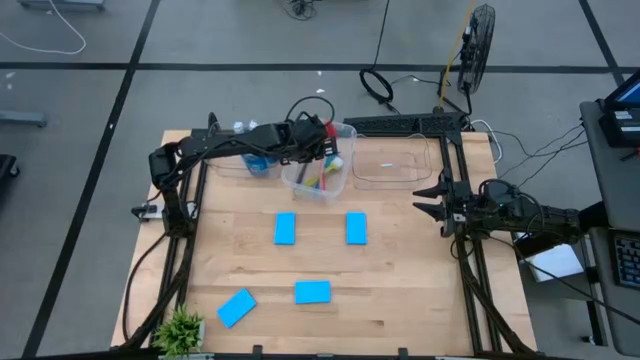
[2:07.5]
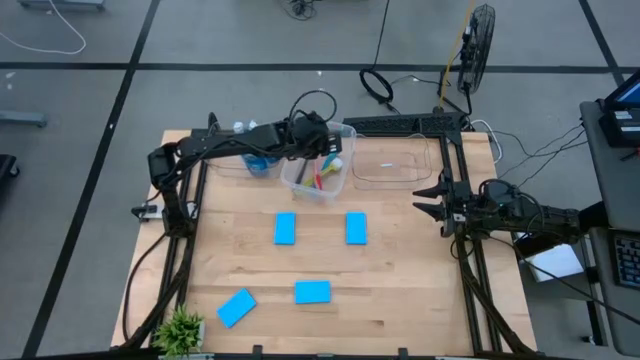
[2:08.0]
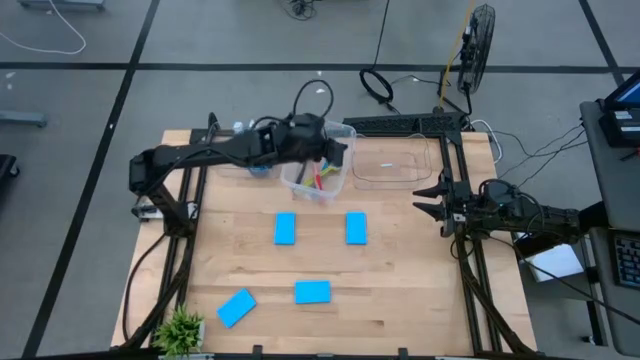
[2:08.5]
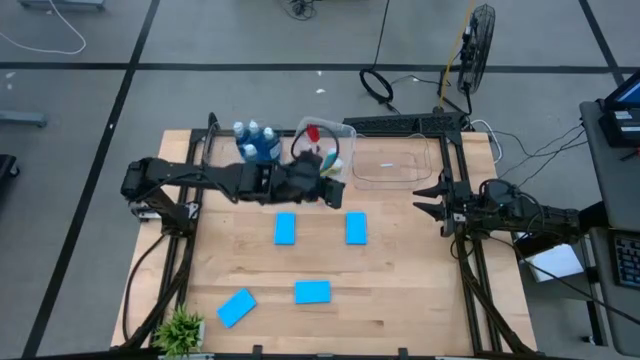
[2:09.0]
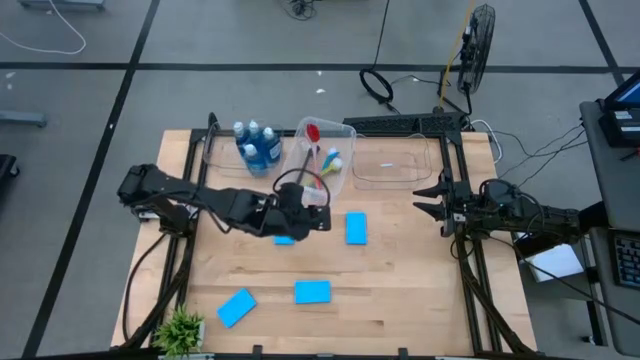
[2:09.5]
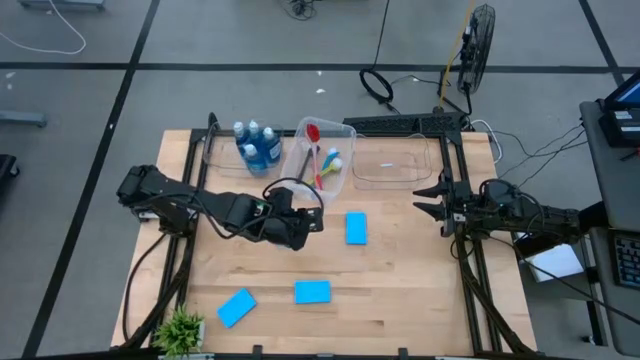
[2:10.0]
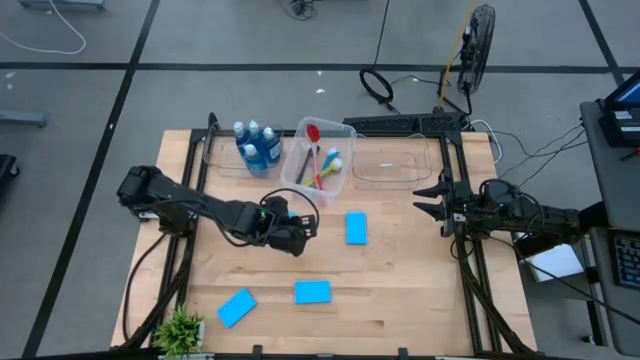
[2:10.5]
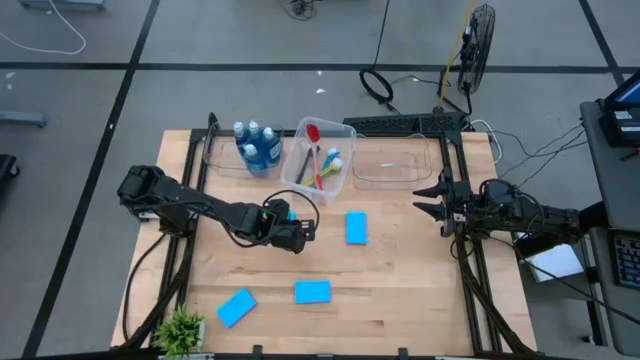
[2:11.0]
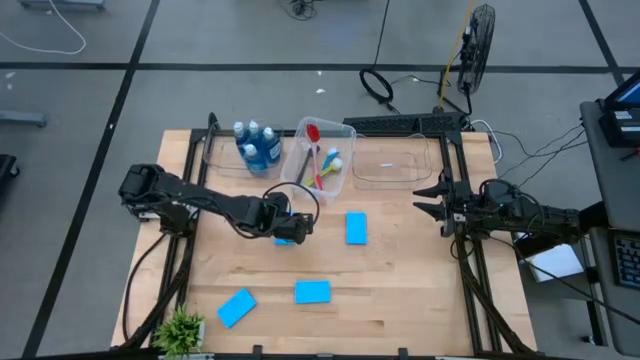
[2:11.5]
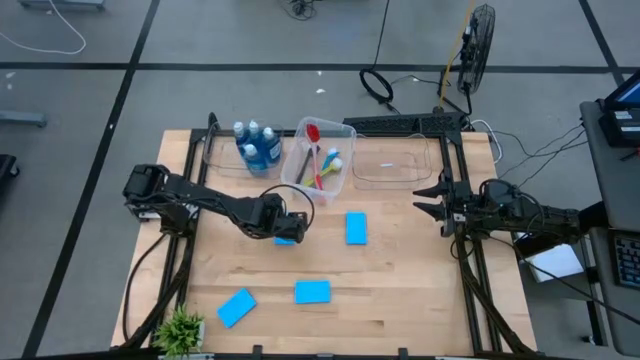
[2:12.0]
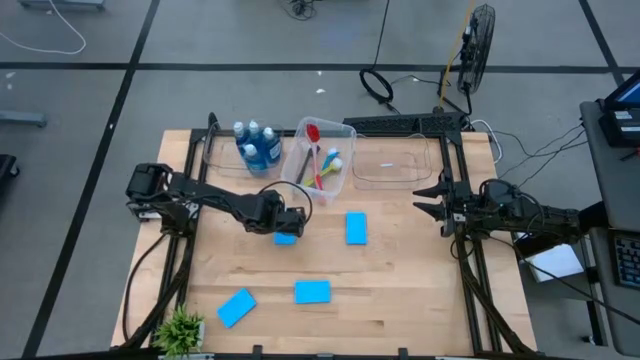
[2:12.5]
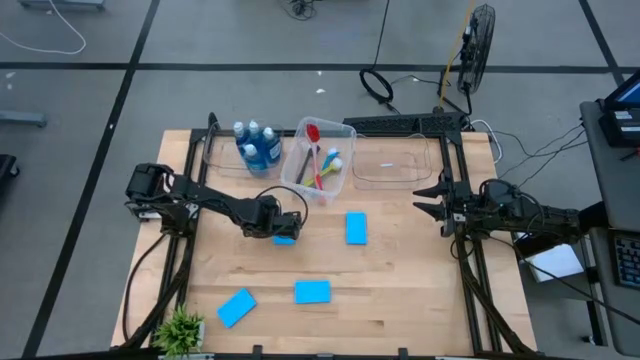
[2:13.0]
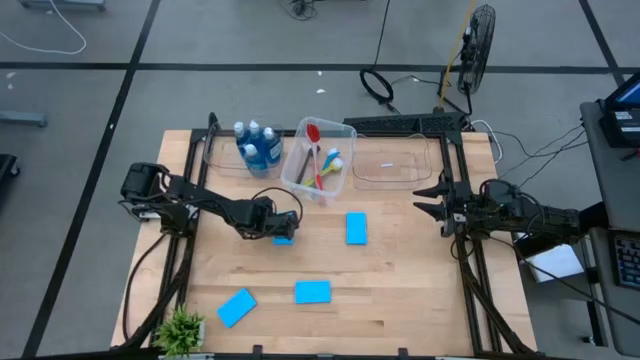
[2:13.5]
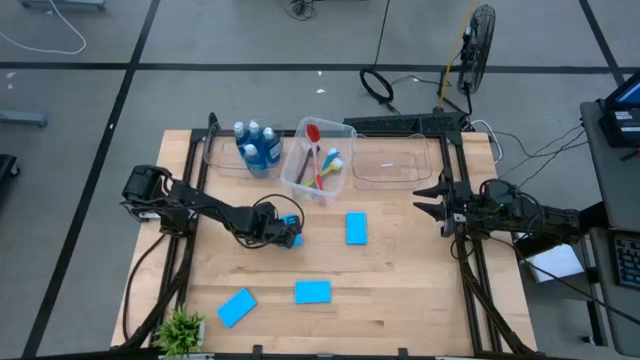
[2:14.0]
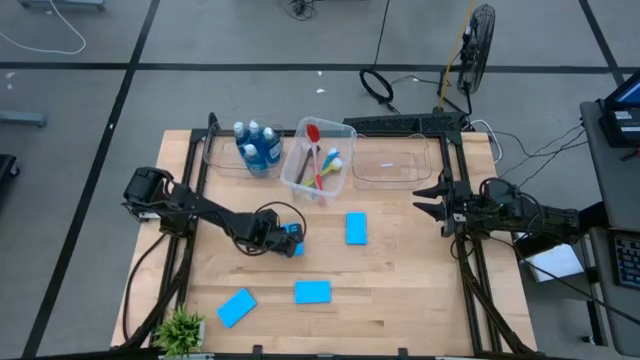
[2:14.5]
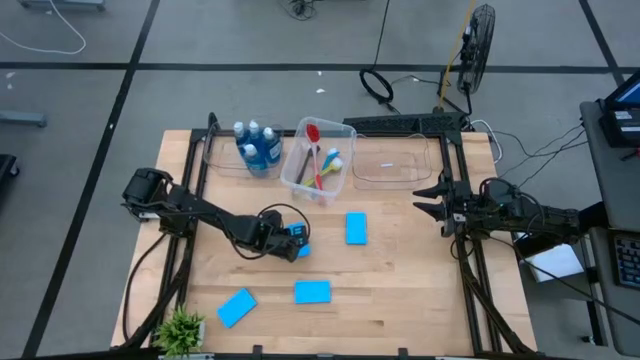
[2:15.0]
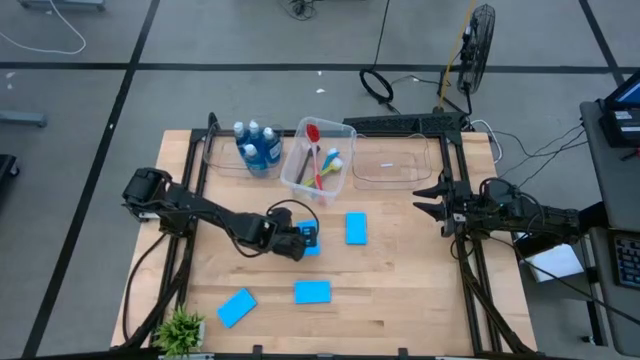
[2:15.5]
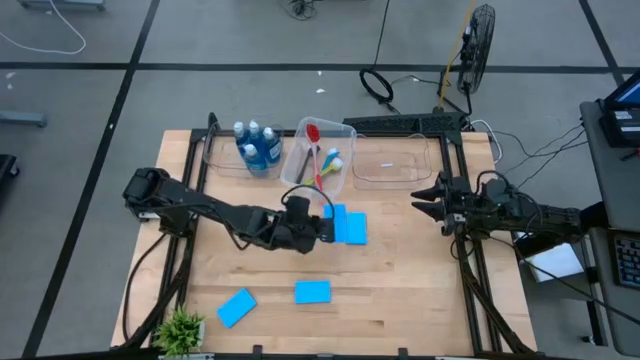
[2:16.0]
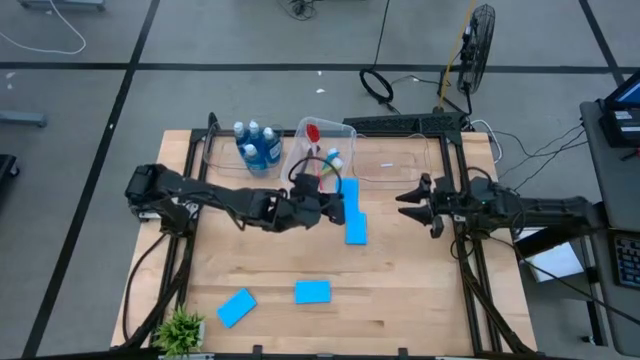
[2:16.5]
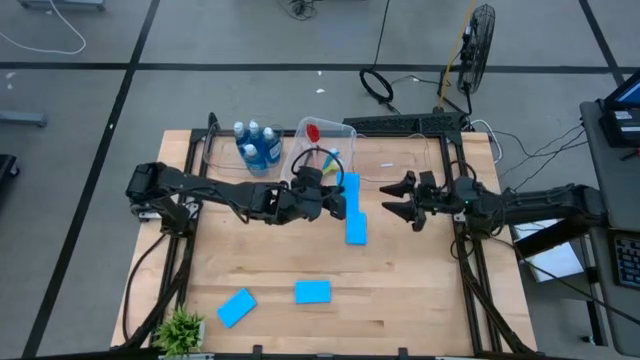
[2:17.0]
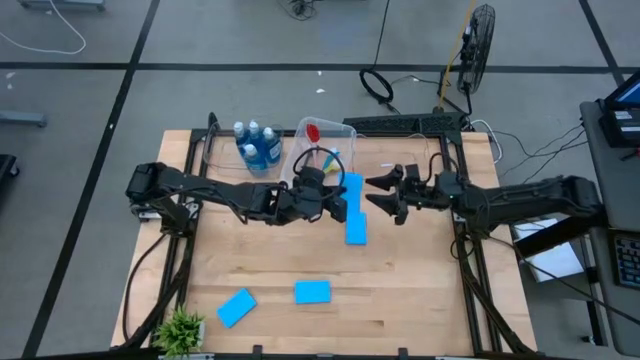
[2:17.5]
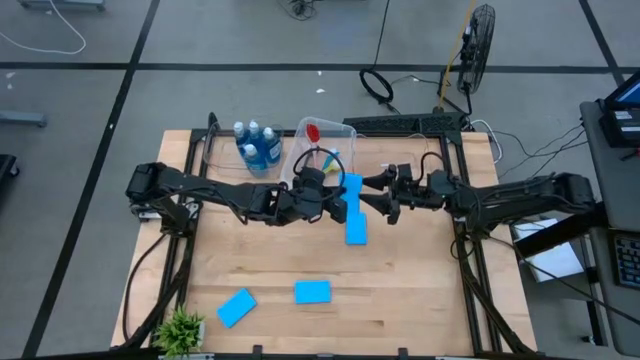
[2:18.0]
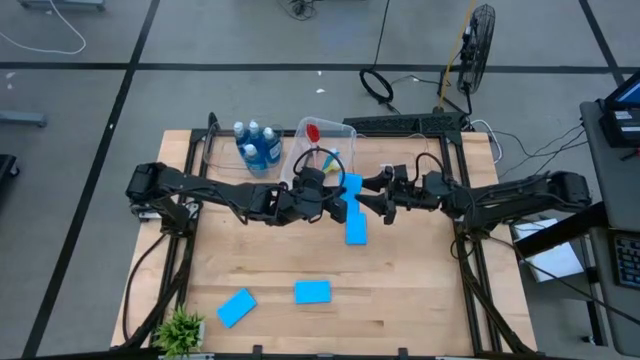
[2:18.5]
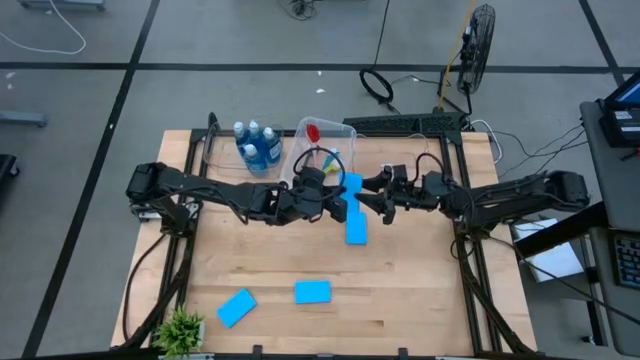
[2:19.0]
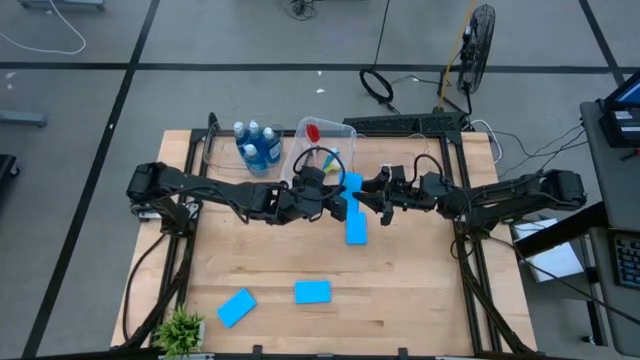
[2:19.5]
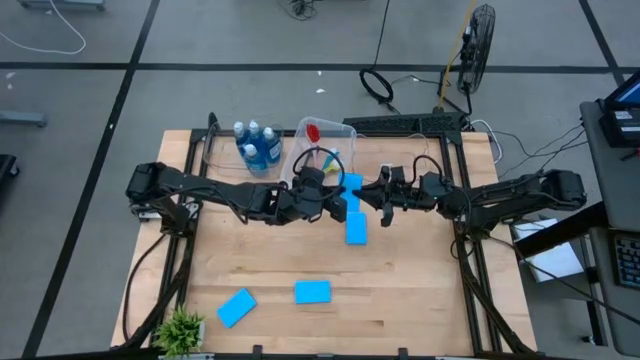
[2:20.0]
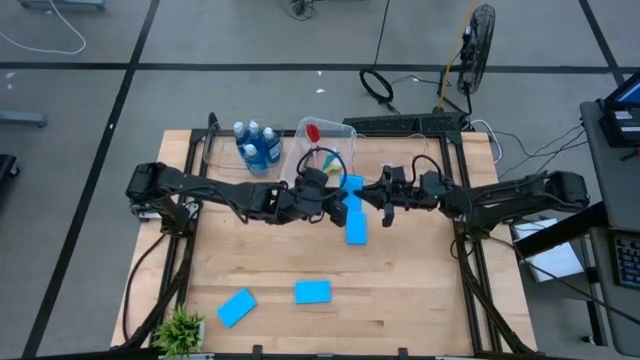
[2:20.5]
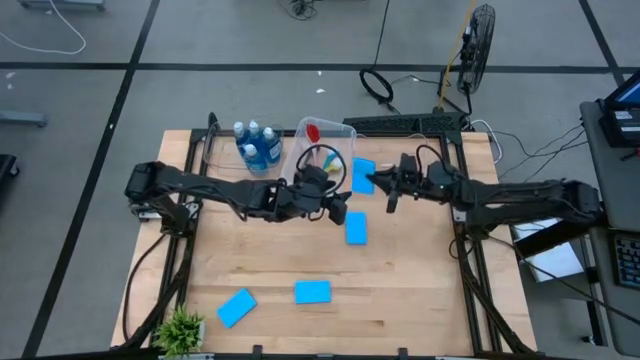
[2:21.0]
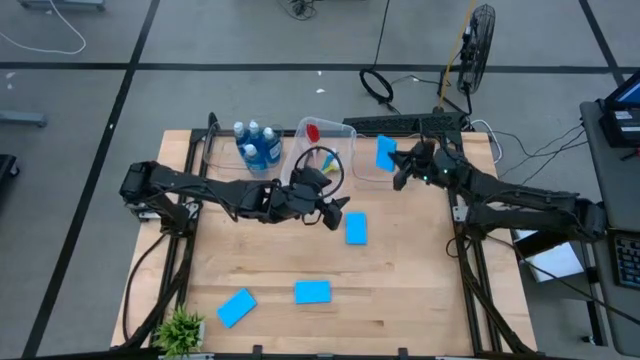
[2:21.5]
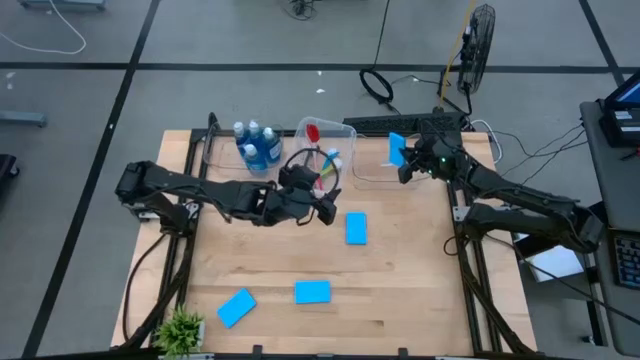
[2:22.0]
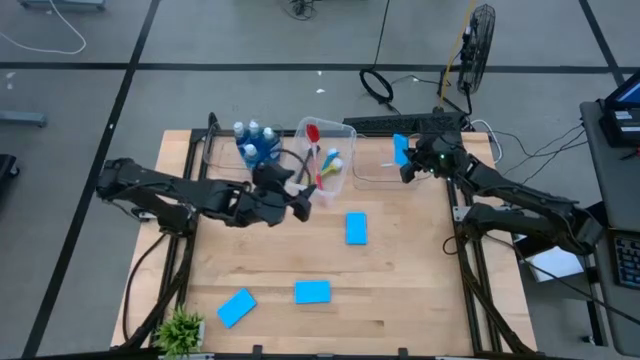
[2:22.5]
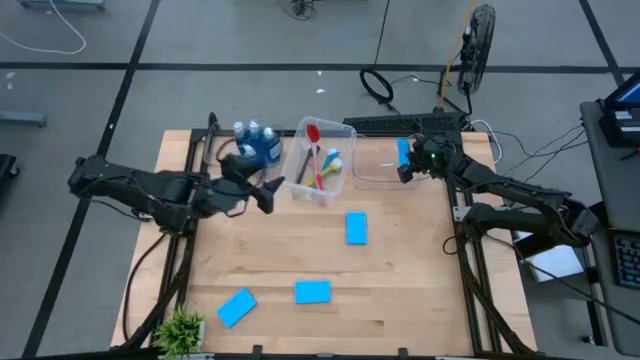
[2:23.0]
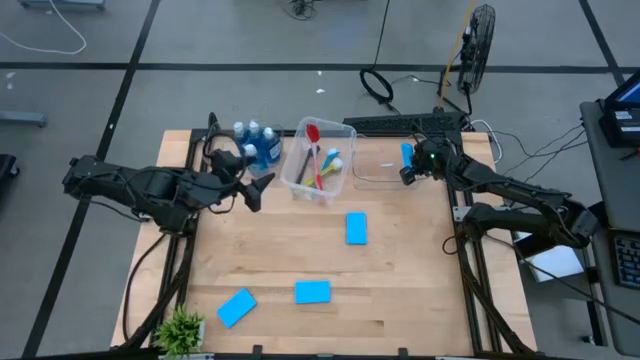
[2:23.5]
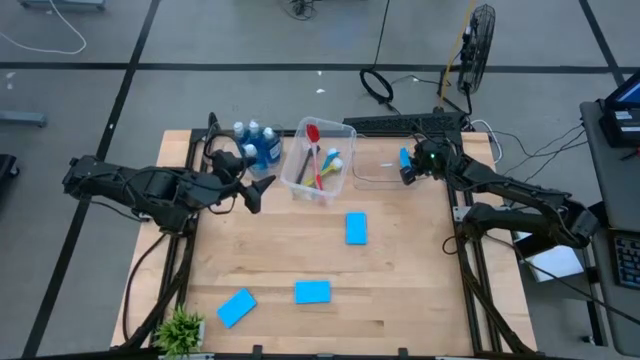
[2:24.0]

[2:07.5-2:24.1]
Task: Pick & Place Kitchen Sink Supplies
Put the blue sponge into the right transparent bin

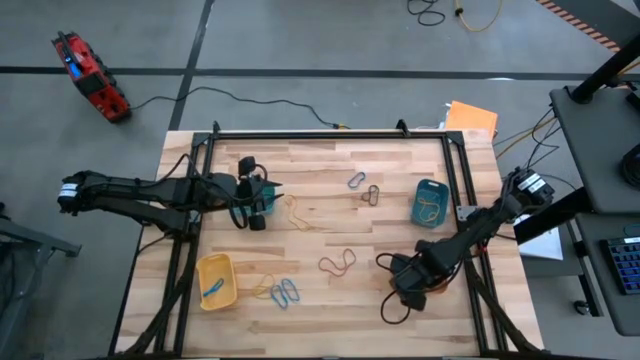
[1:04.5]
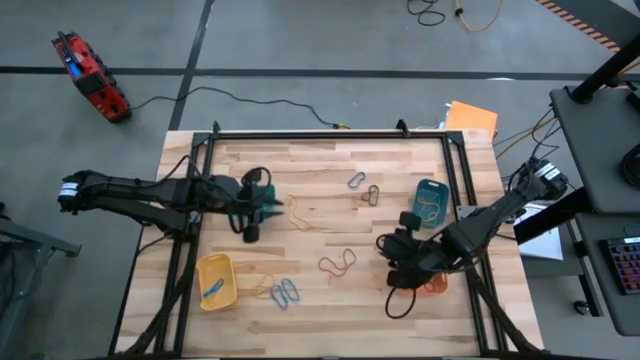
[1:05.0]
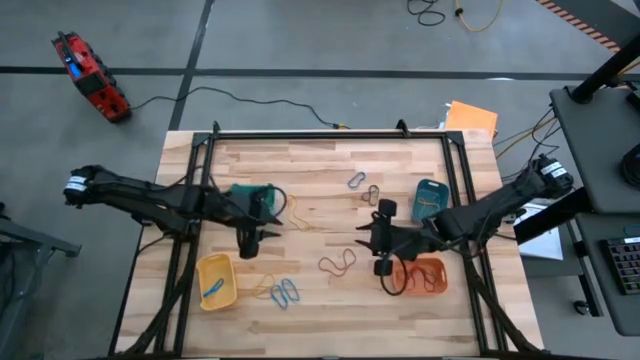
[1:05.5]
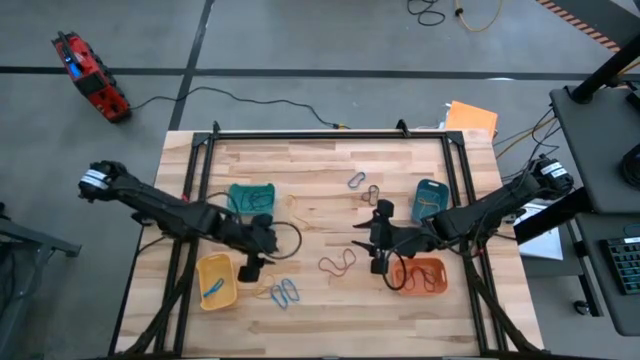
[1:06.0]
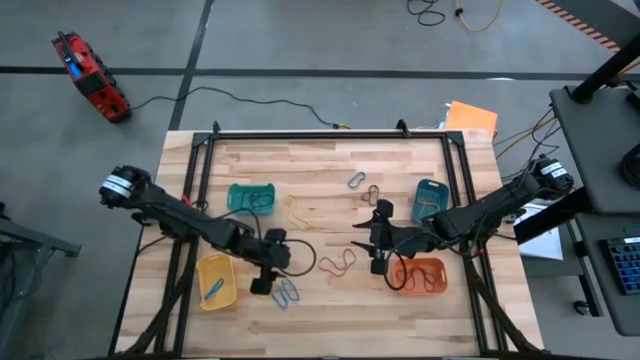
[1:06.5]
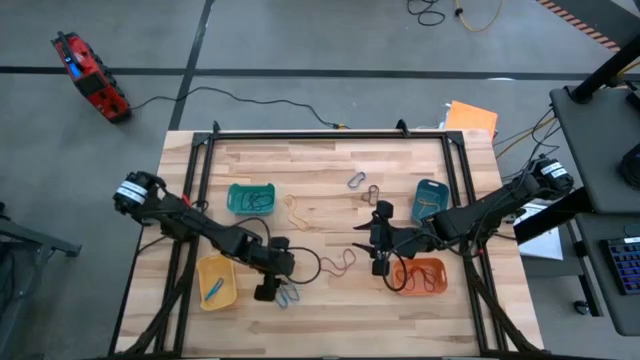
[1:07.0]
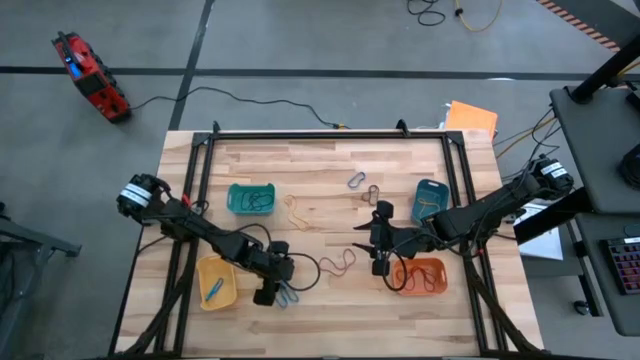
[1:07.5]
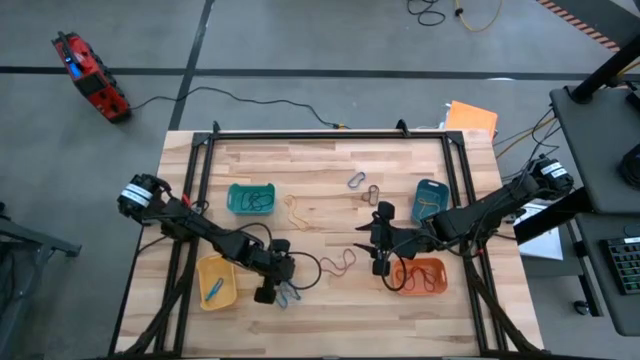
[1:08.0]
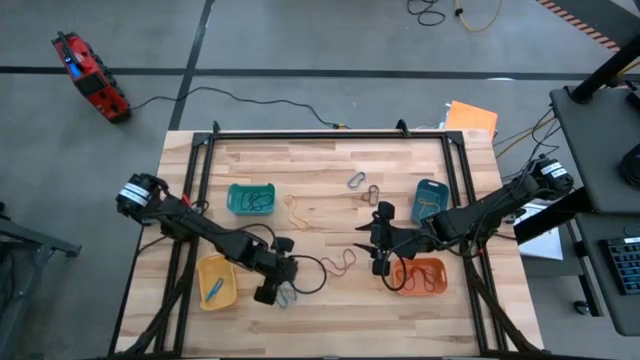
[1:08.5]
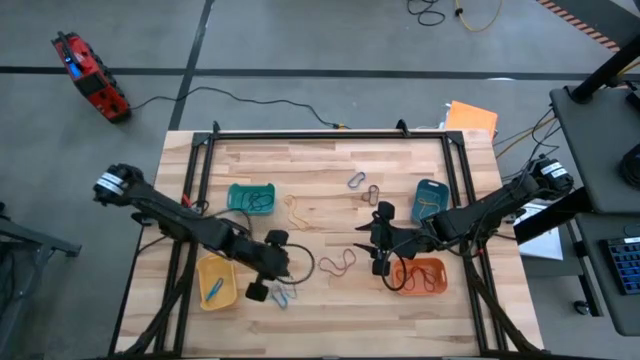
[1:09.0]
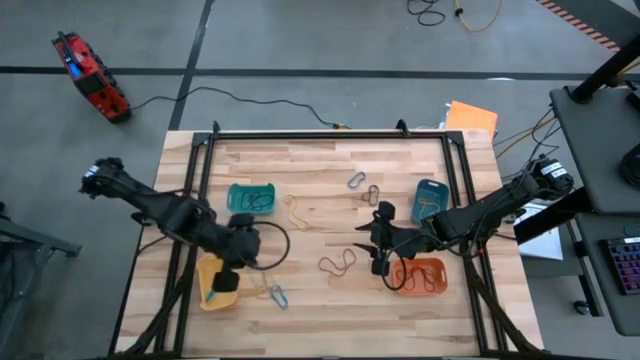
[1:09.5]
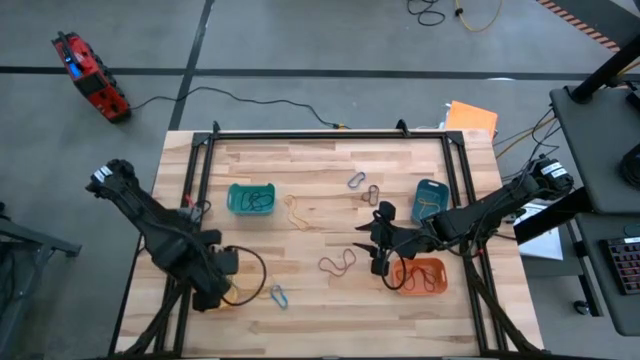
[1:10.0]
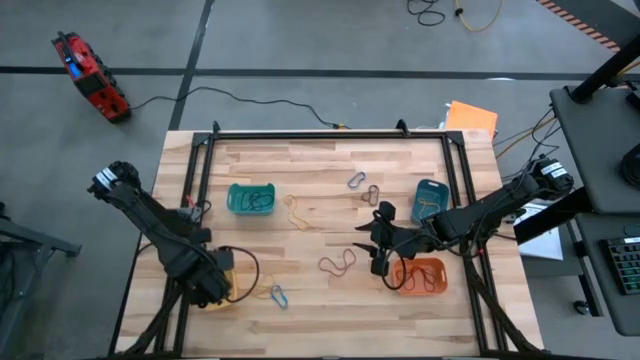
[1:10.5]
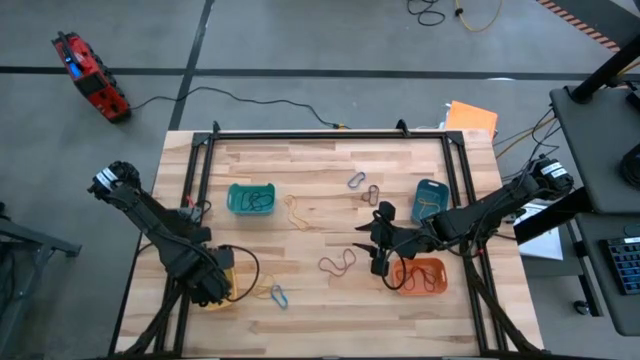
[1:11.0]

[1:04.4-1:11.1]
Task: Sort rubber bands into baskets
Put the blue rubber band into the yellow bin
